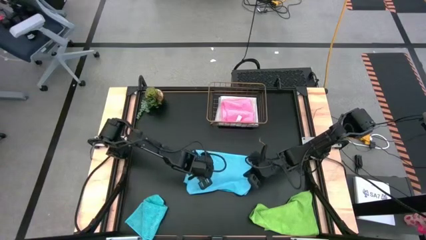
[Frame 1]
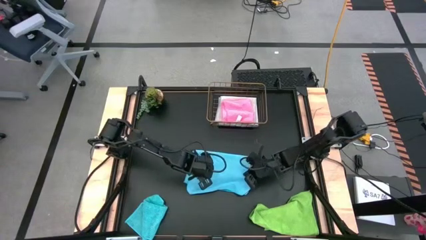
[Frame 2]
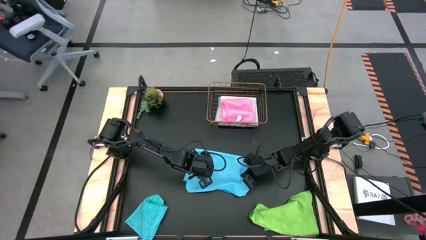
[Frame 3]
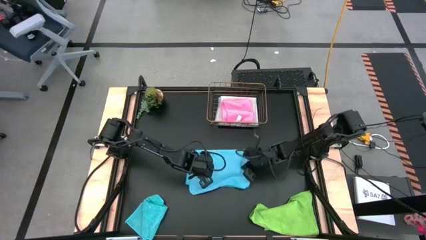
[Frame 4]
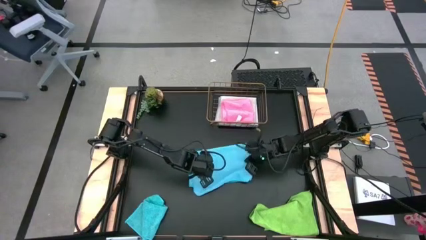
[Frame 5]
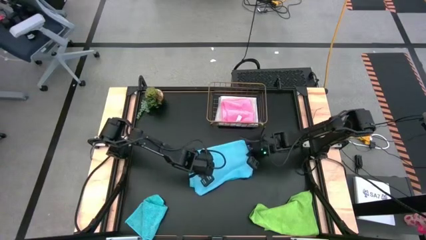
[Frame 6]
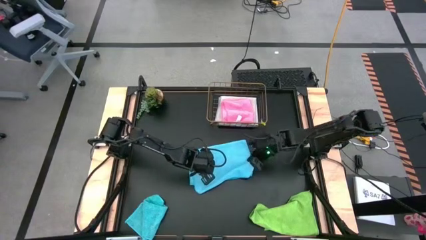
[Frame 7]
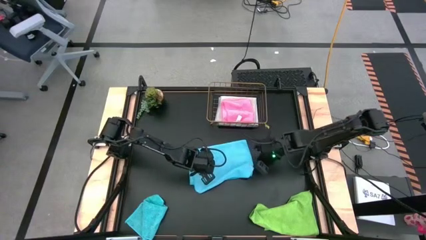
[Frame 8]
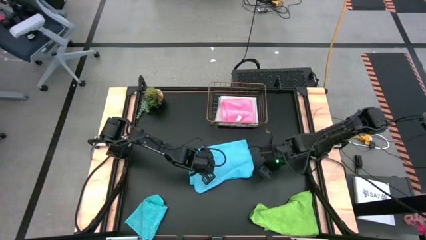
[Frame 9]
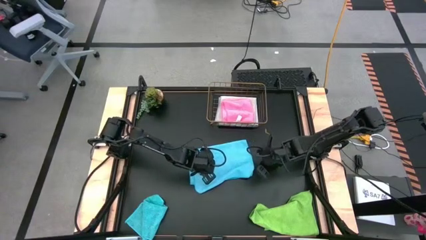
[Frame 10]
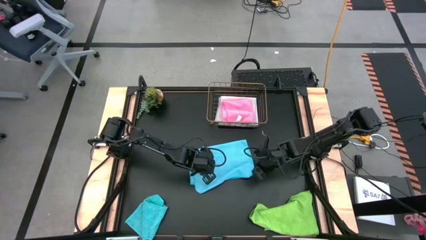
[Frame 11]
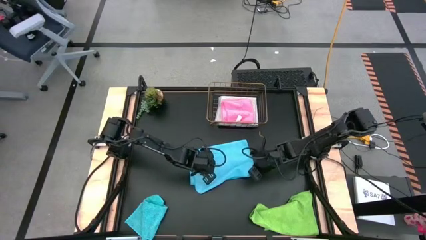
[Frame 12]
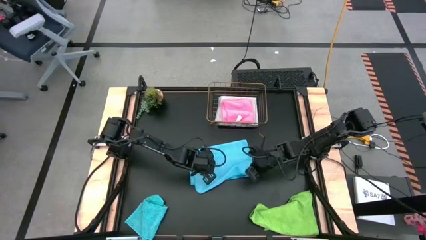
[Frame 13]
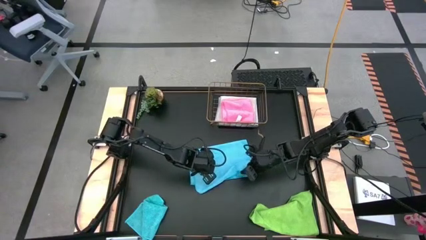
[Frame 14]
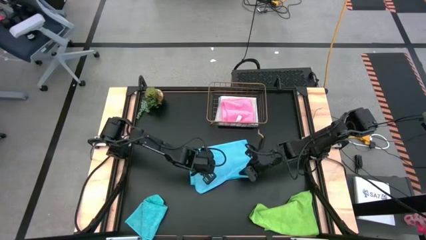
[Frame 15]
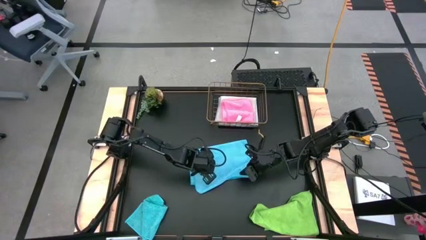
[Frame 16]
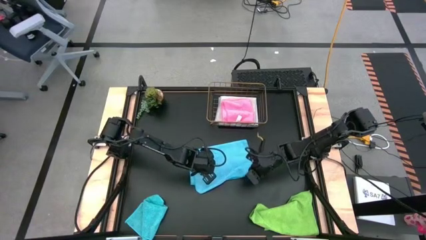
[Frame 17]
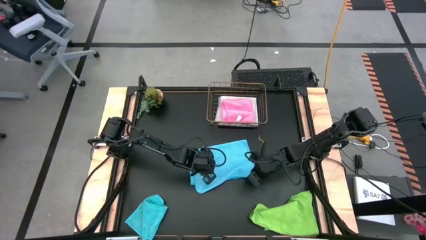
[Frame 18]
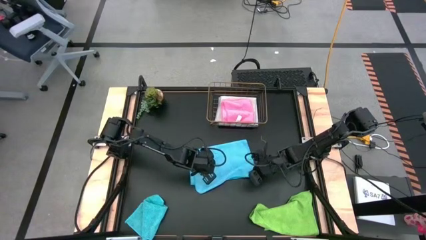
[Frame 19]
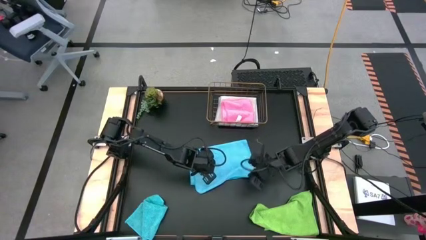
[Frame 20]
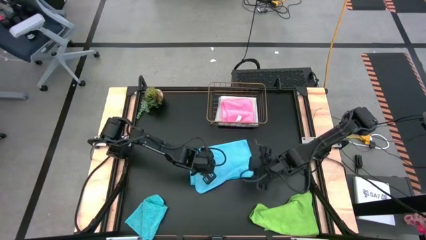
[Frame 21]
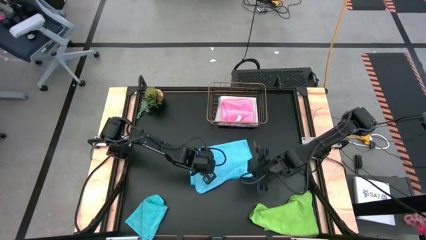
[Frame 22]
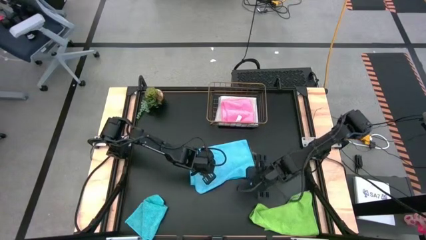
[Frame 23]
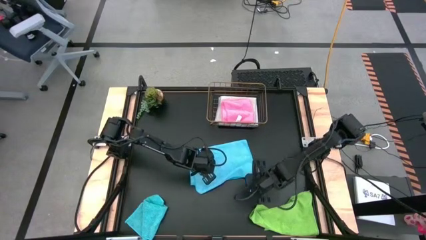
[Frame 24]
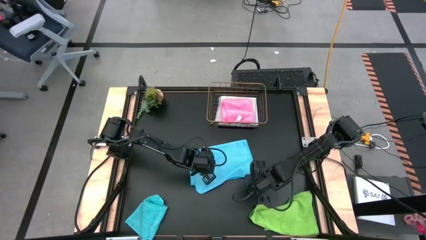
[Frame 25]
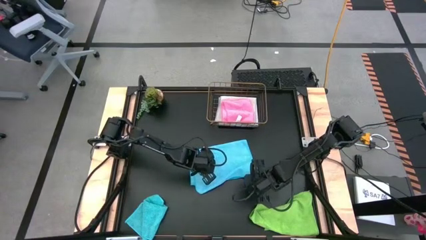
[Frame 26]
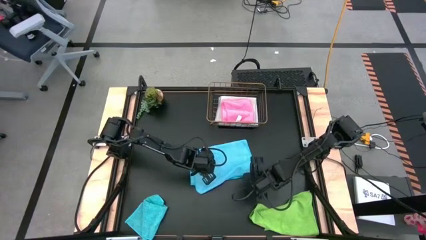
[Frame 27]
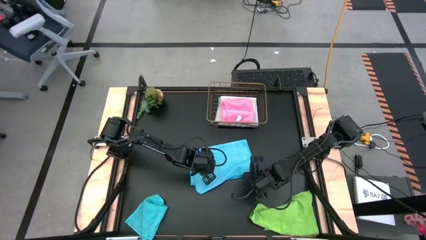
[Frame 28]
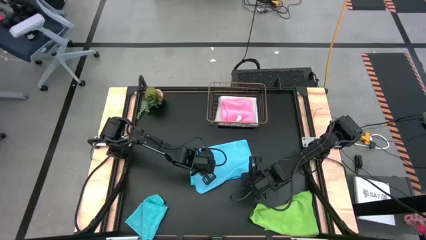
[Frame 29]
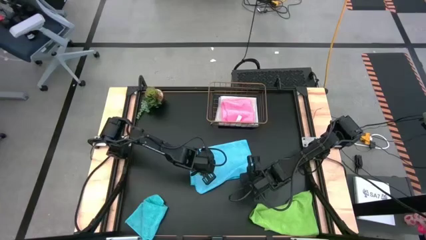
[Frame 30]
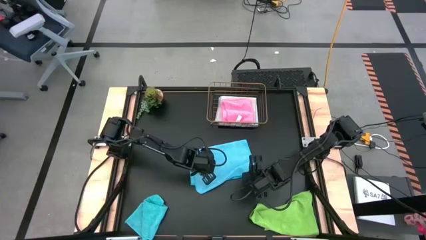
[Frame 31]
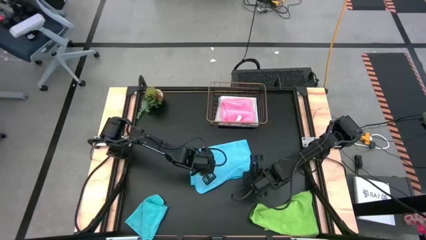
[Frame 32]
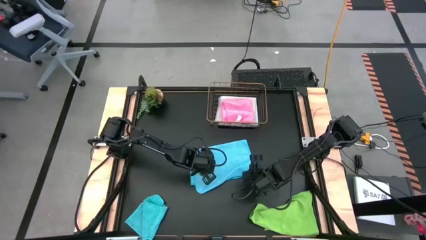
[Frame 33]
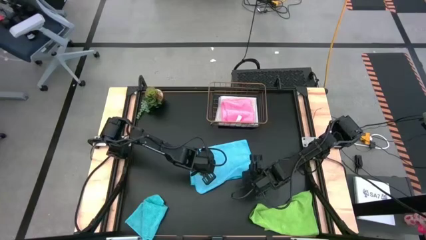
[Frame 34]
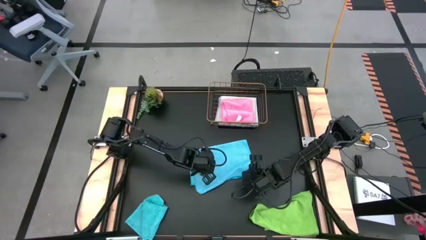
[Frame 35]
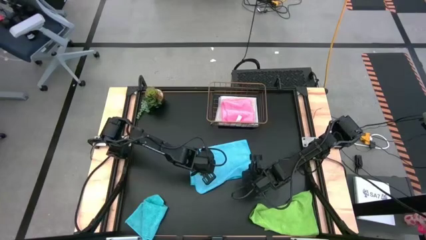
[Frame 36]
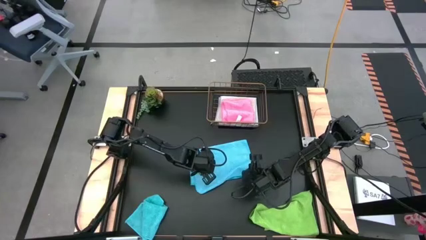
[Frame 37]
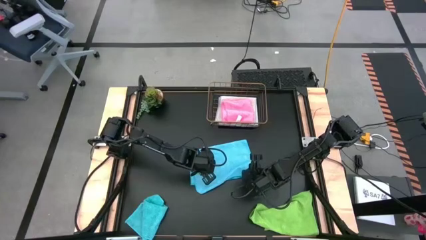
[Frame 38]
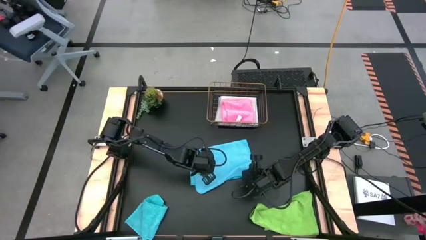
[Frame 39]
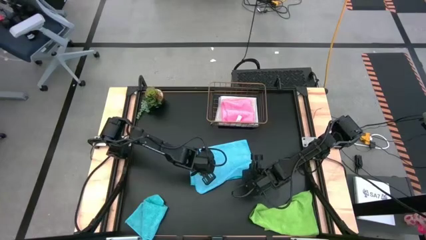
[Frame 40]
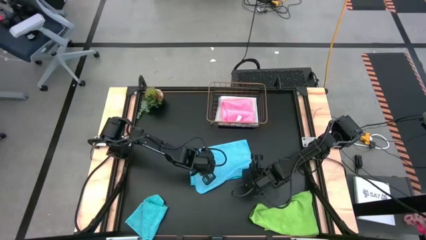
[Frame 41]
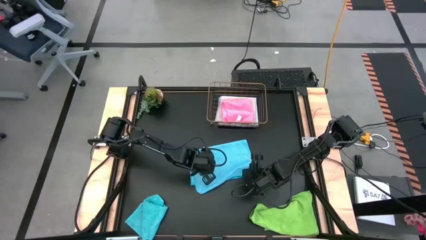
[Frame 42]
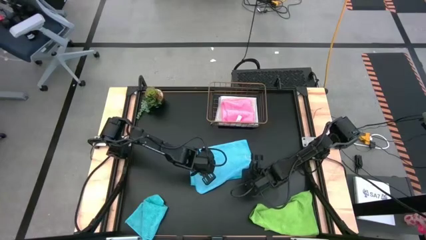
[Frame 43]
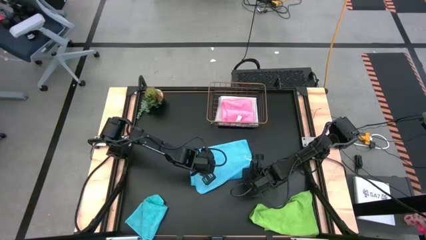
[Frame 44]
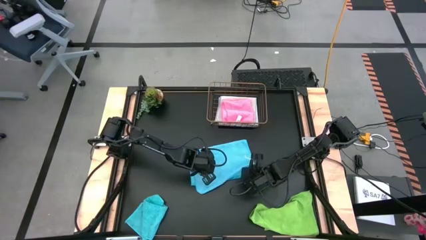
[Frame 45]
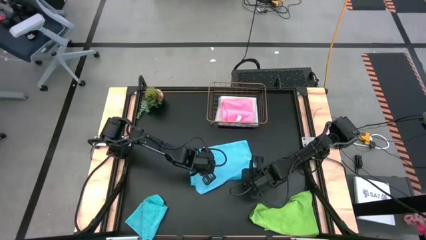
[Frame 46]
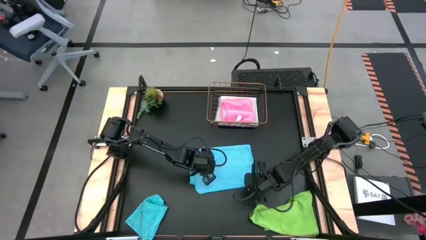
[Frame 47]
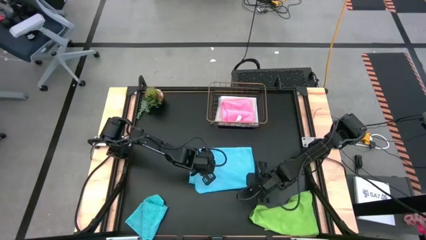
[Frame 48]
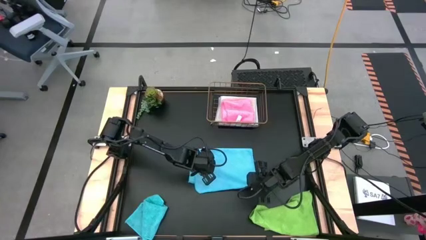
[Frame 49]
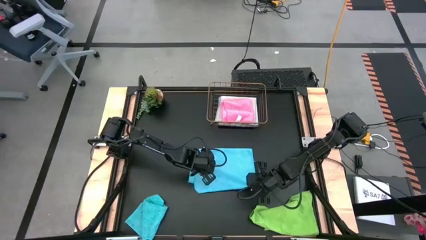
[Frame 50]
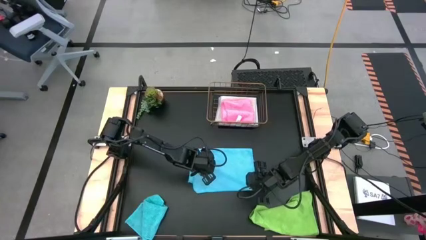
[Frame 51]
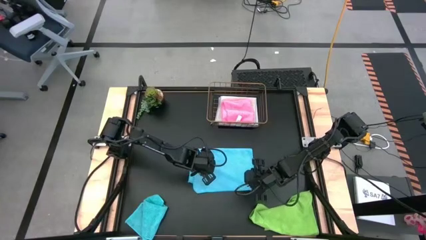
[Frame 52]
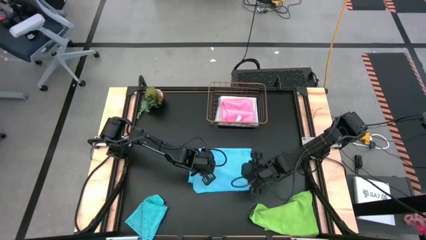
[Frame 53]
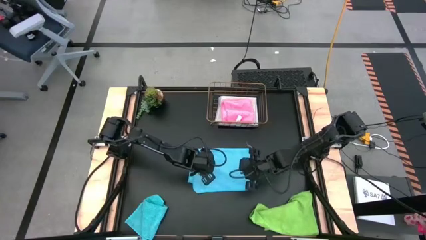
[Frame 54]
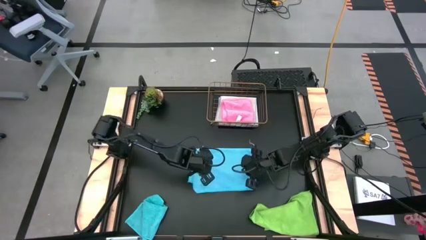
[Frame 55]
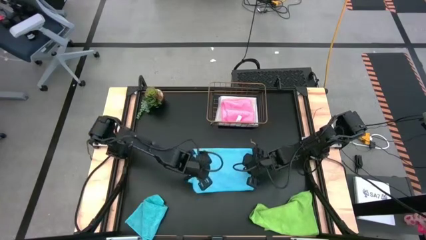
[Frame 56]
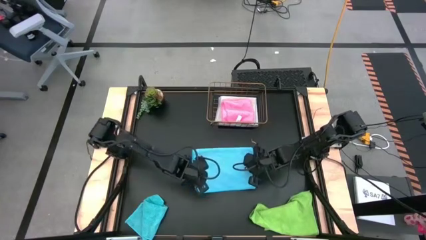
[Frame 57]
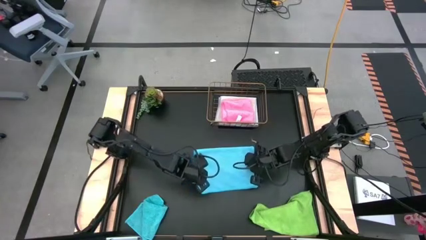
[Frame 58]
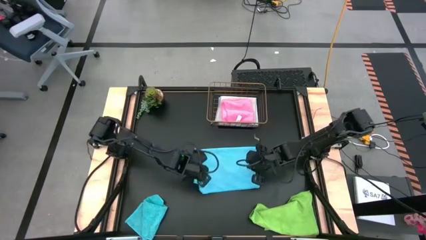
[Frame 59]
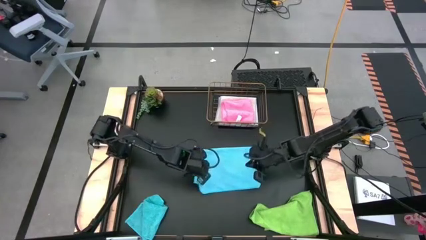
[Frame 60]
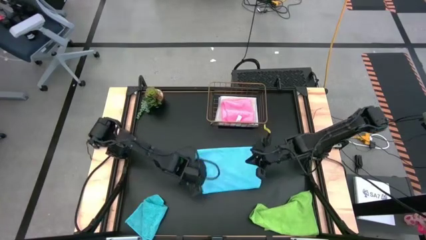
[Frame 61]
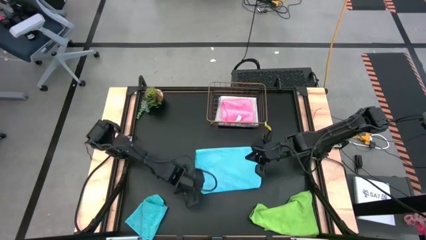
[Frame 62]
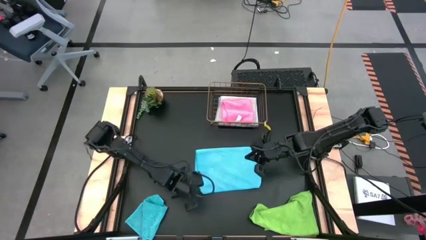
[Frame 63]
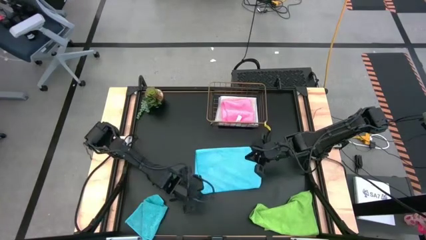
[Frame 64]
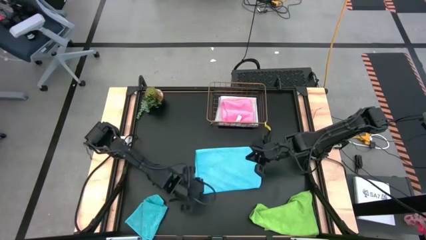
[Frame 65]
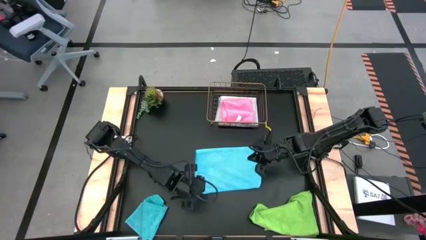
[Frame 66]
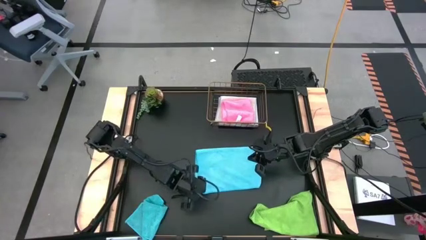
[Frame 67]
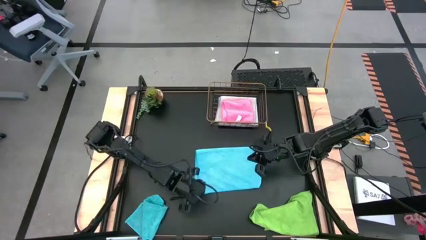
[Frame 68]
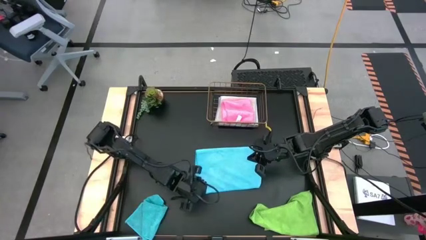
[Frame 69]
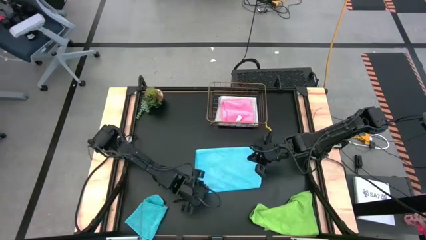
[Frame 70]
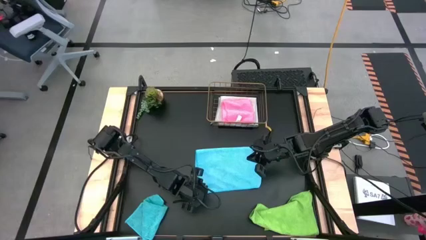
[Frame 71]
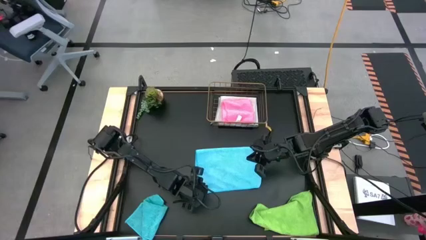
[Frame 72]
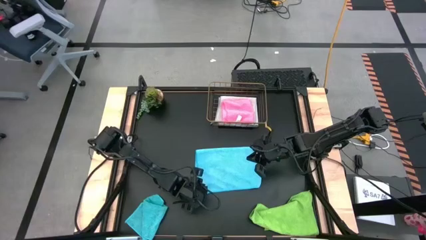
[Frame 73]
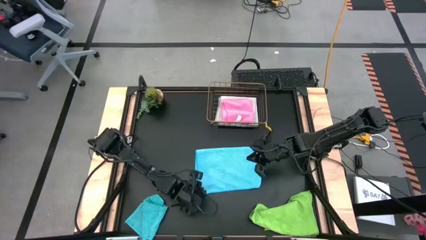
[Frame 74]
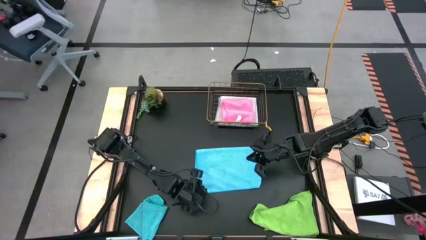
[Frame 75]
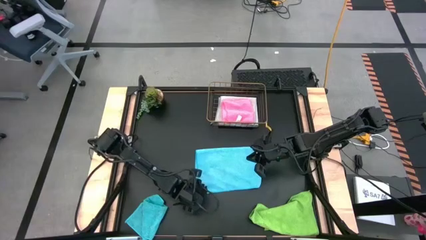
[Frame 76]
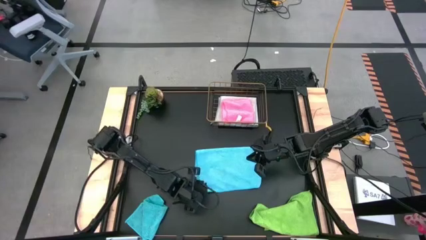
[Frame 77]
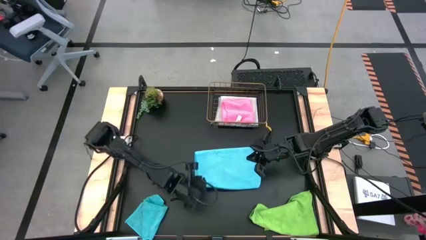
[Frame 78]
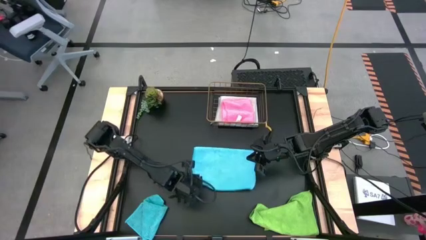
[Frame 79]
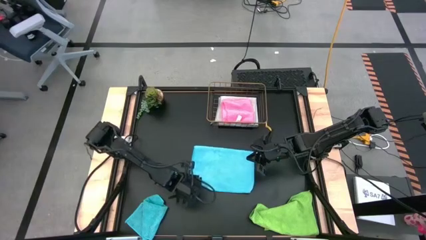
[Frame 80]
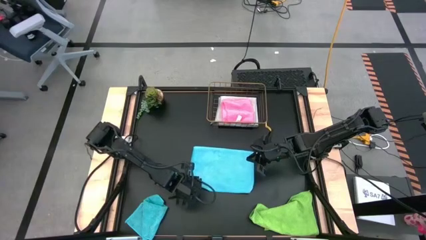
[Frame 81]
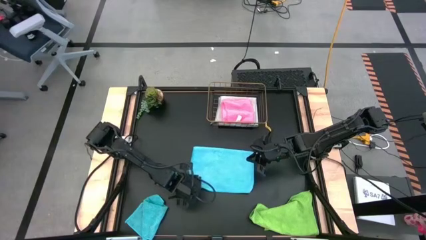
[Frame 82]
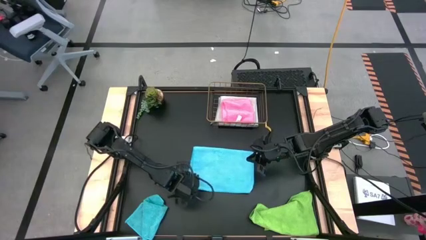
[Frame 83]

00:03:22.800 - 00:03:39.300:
Task: Fold microfiber towels
Fold the right blue towel
